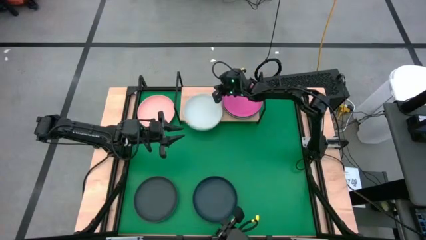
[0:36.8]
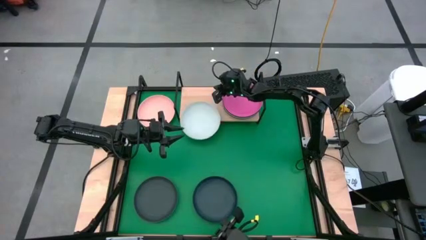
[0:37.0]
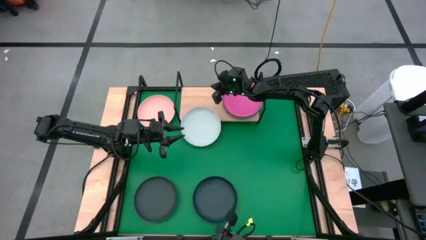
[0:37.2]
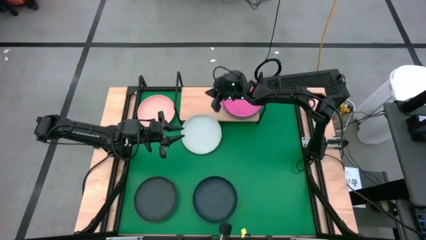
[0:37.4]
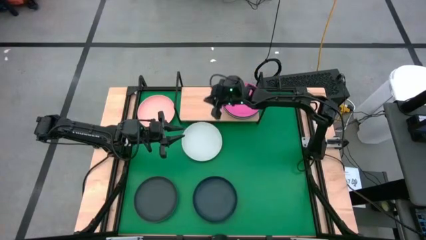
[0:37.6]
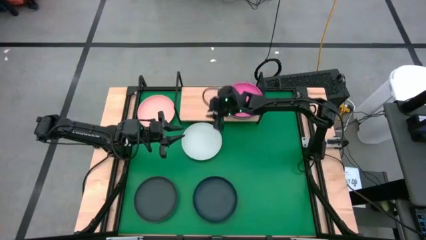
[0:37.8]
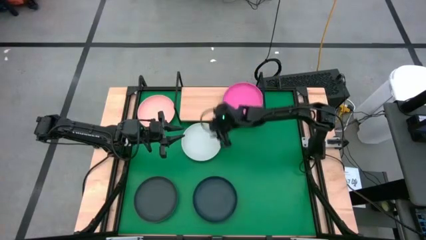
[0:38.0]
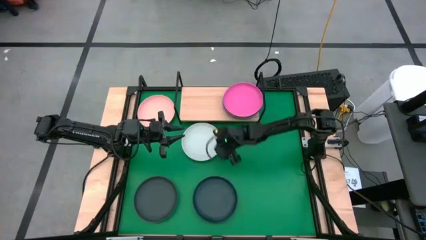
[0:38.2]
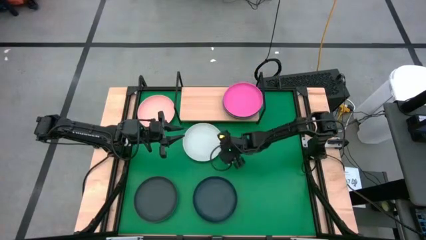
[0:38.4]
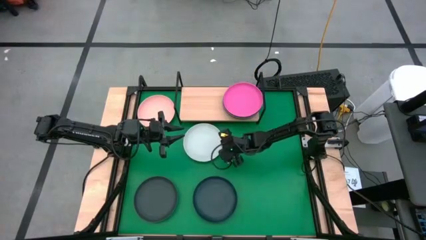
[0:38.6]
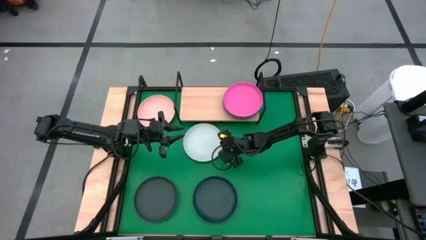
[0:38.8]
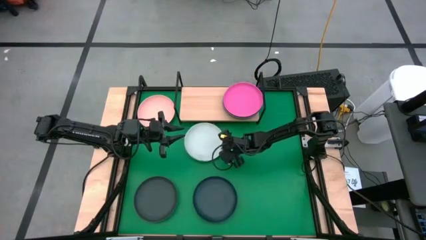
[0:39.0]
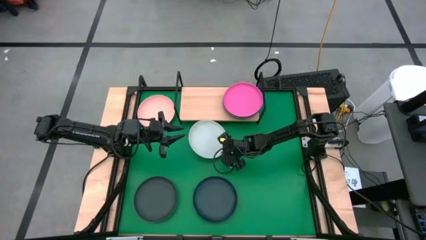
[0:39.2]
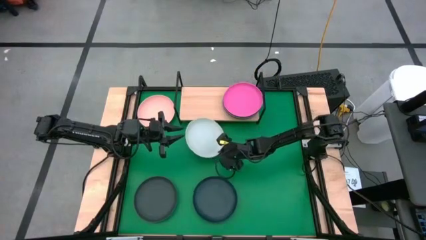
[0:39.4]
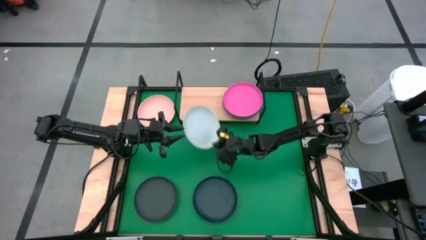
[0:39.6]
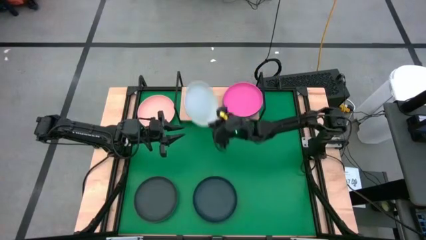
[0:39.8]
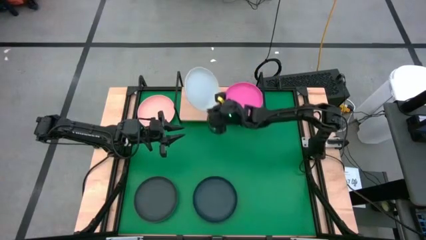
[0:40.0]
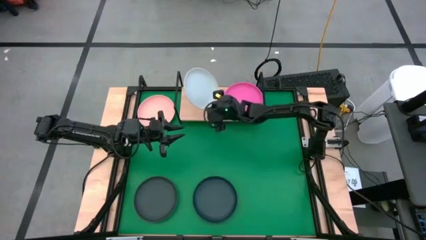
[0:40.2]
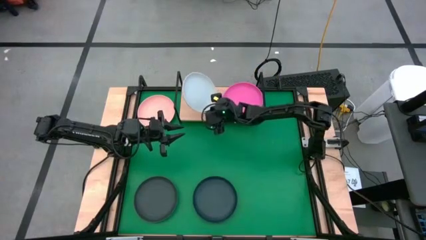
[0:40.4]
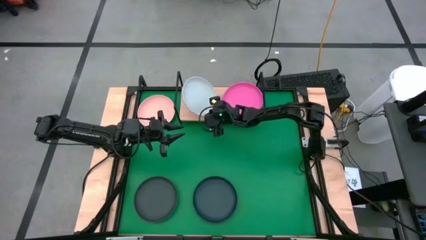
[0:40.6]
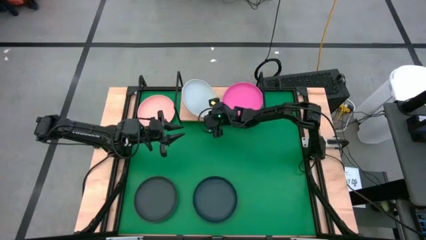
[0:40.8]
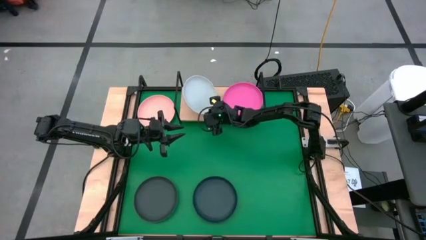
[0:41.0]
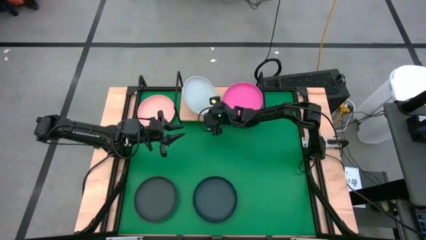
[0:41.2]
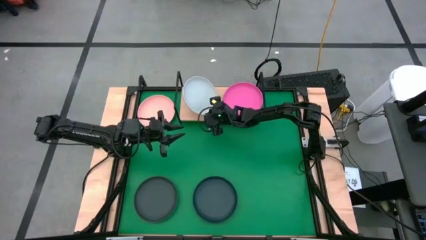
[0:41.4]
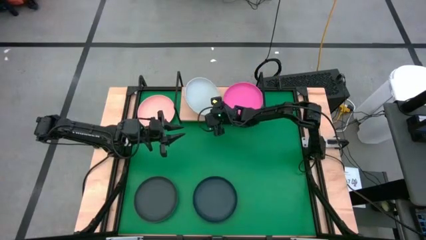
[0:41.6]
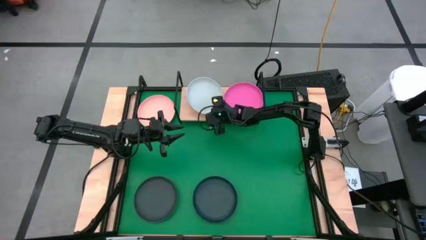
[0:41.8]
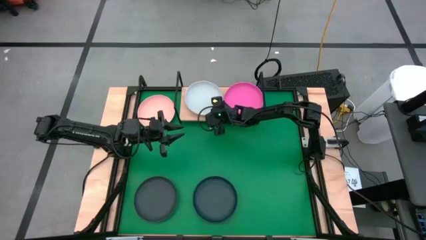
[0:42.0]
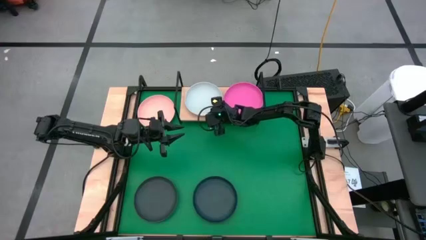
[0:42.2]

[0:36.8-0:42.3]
Task: Place and stack plates onto a shelf
Put the white plate on the shelf

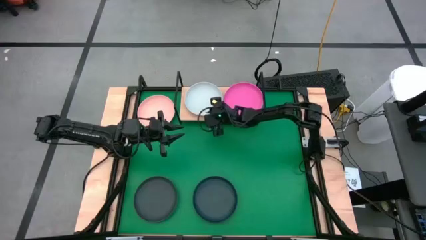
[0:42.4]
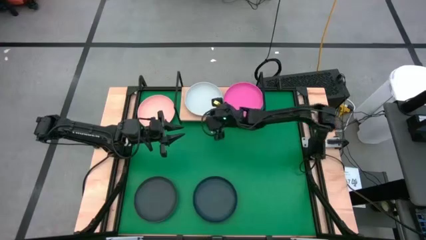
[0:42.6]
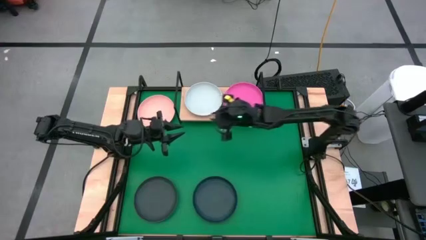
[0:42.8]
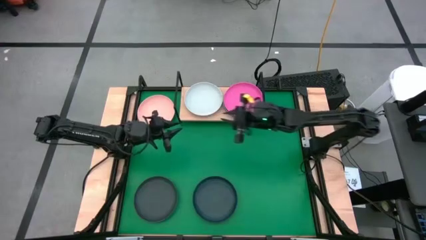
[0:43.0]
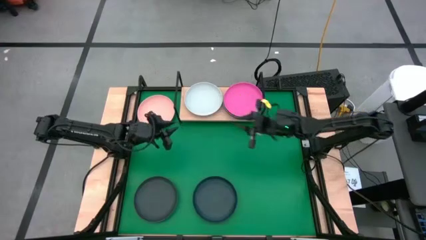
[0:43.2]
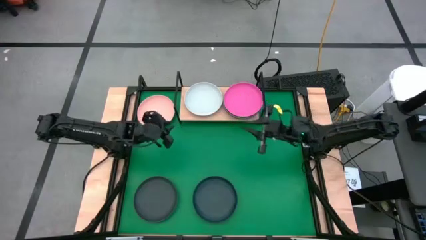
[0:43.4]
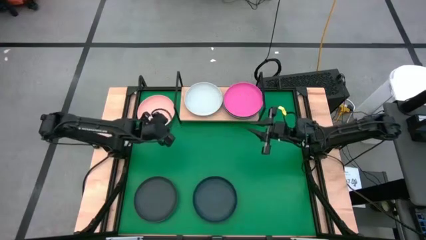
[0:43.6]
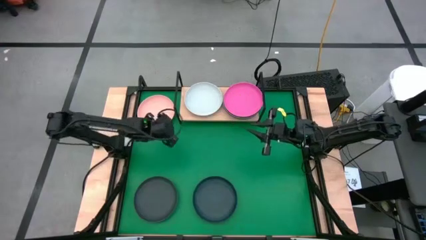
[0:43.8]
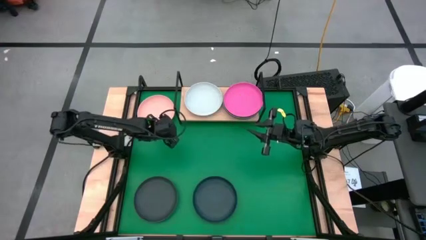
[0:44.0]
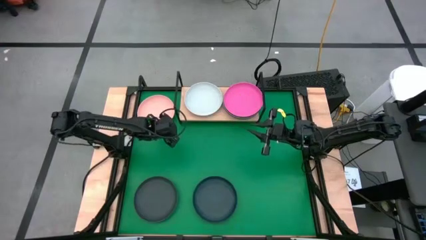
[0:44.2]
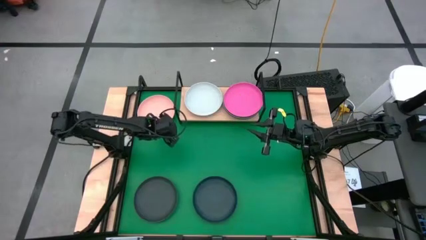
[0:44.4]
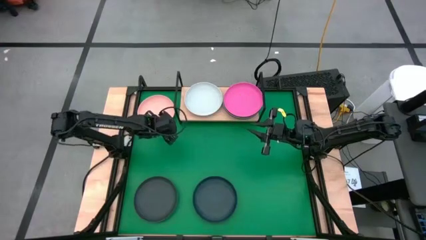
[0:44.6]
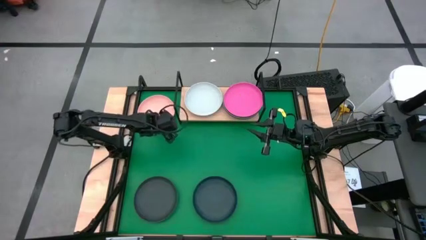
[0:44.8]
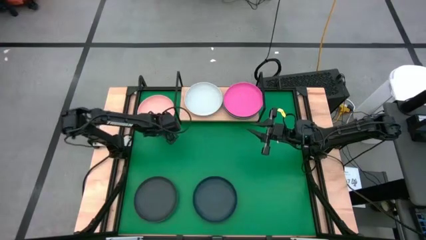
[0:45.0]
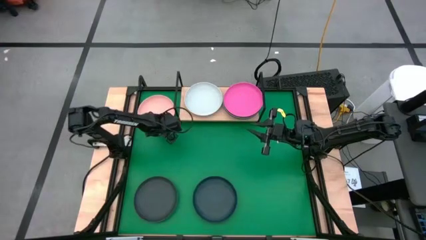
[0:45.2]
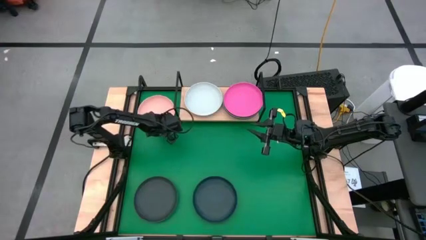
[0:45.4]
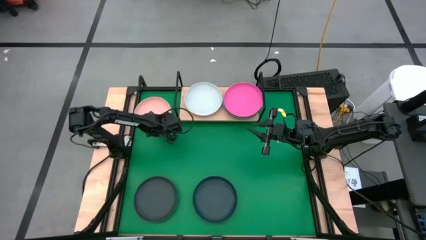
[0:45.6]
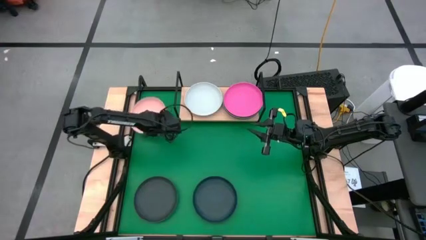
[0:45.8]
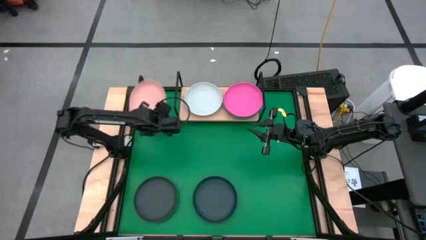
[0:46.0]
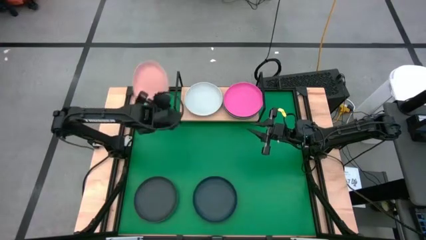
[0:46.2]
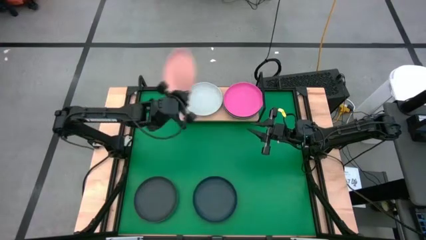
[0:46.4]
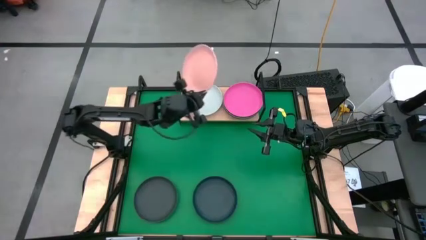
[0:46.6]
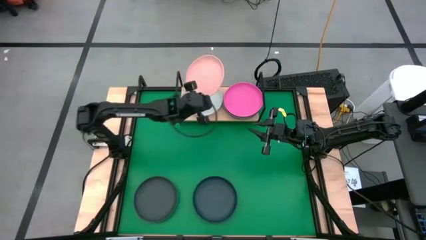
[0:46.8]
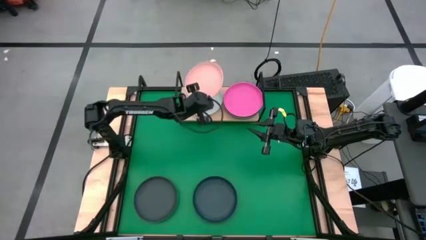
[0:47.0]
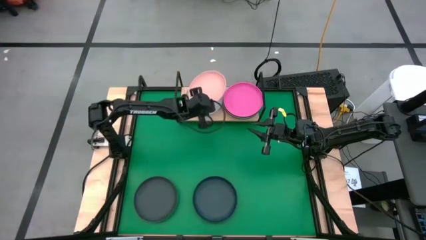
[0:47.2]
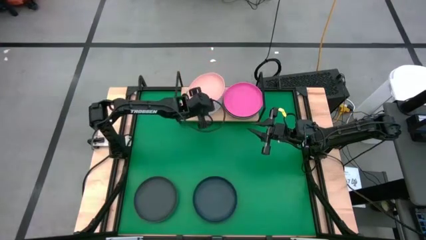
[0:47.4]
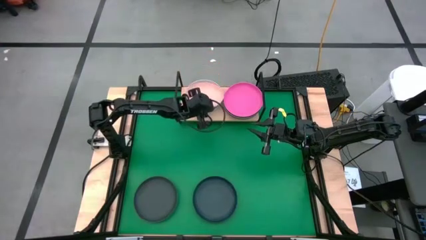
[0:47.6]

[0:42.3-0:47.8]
Stack the peach plate on top of the white plate on the shelf

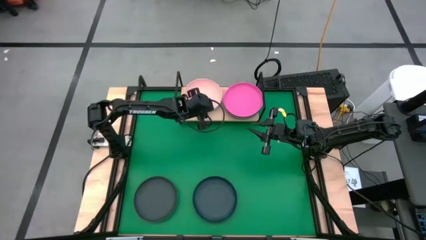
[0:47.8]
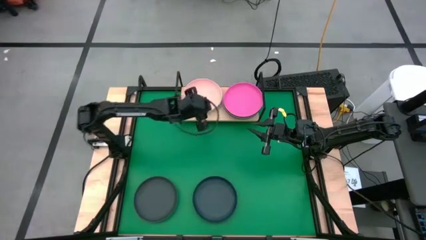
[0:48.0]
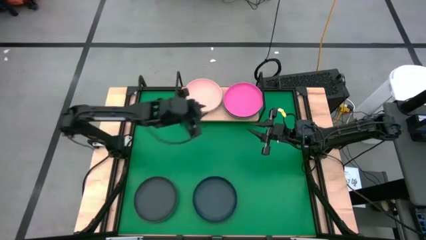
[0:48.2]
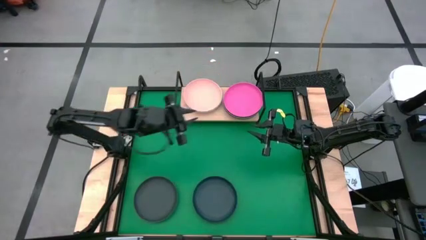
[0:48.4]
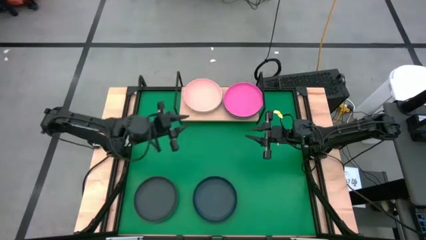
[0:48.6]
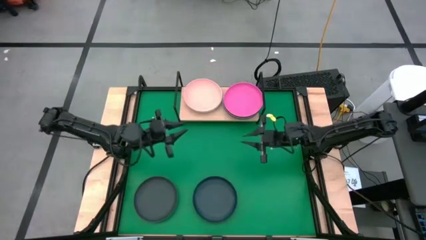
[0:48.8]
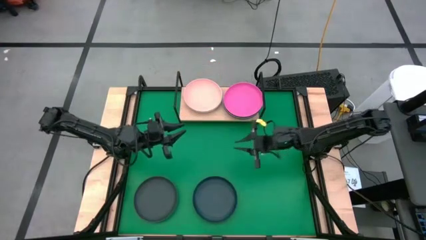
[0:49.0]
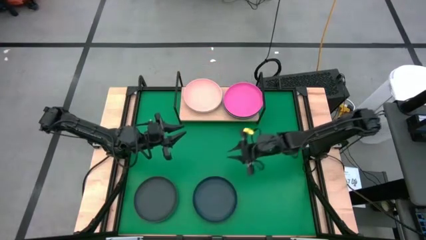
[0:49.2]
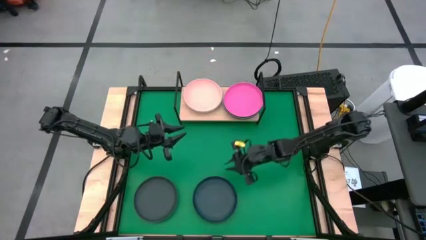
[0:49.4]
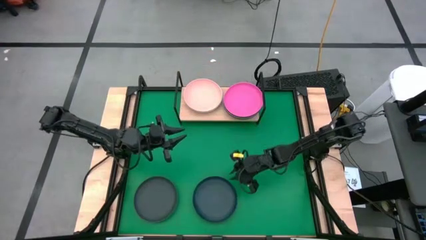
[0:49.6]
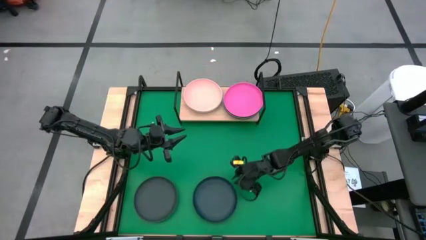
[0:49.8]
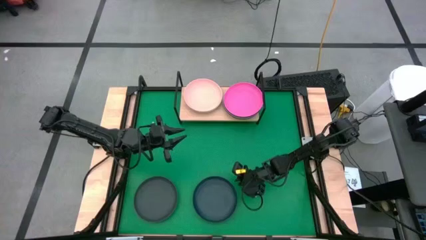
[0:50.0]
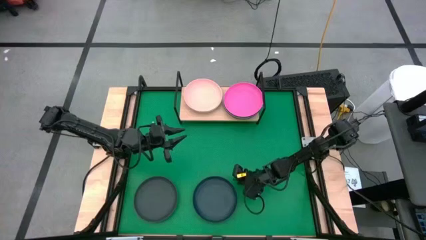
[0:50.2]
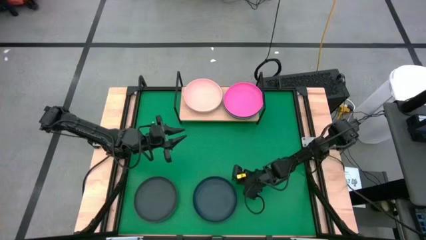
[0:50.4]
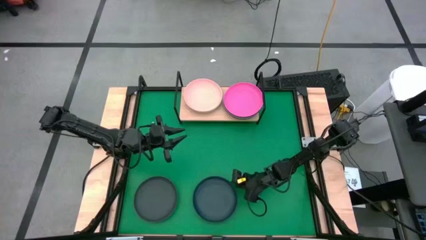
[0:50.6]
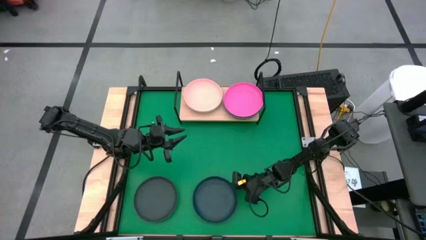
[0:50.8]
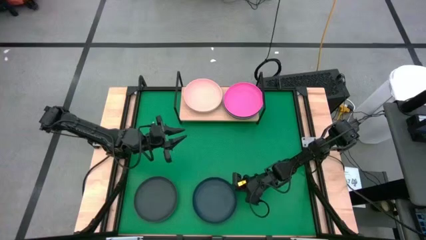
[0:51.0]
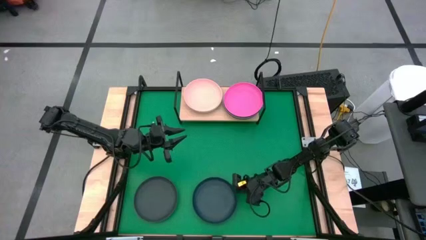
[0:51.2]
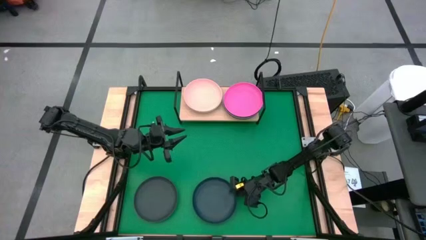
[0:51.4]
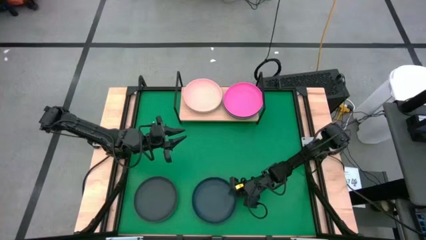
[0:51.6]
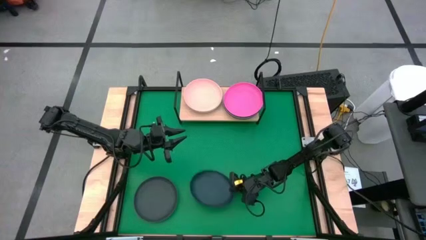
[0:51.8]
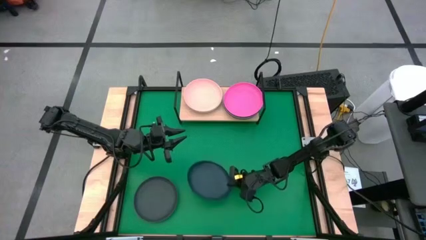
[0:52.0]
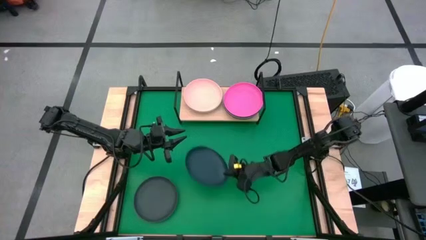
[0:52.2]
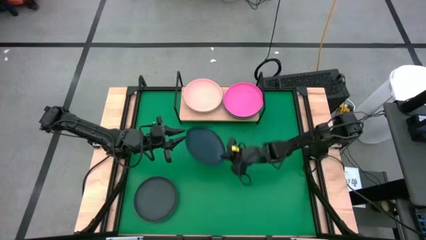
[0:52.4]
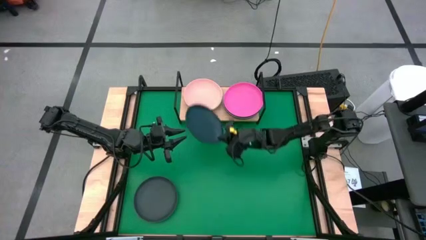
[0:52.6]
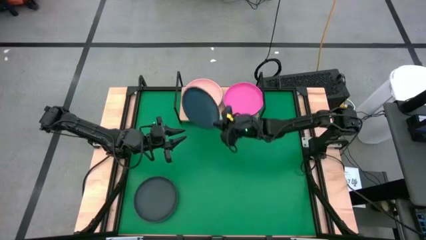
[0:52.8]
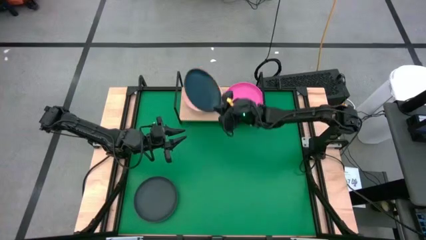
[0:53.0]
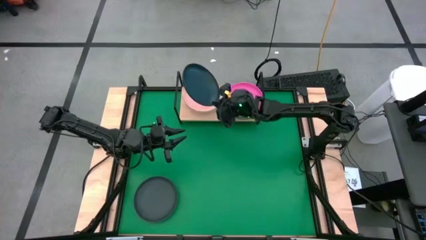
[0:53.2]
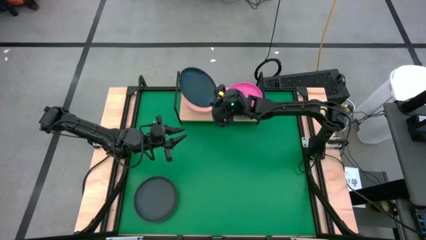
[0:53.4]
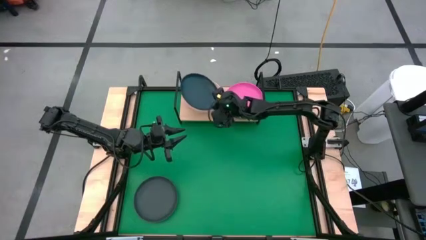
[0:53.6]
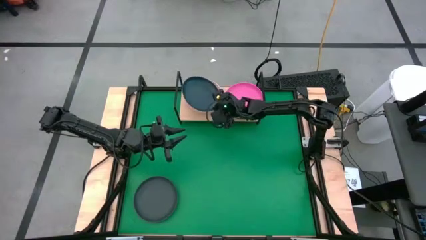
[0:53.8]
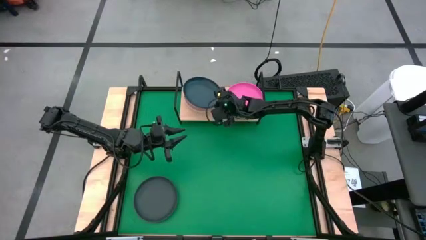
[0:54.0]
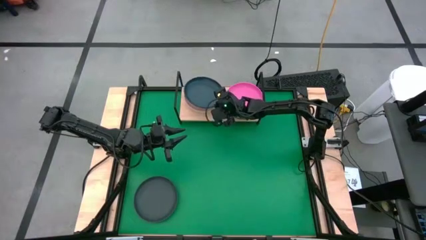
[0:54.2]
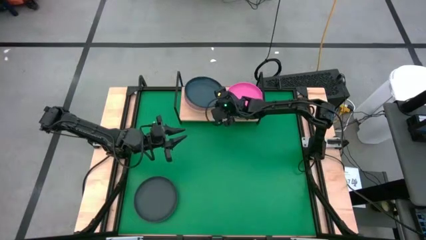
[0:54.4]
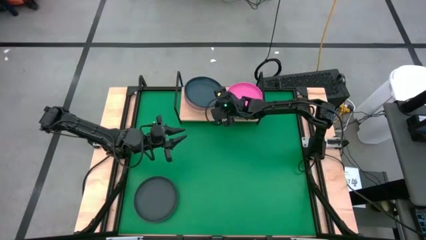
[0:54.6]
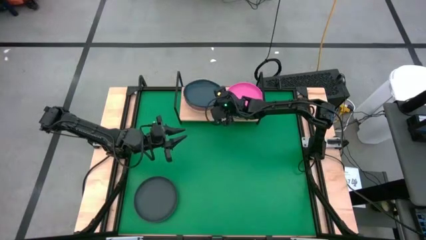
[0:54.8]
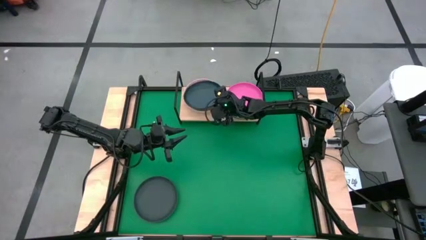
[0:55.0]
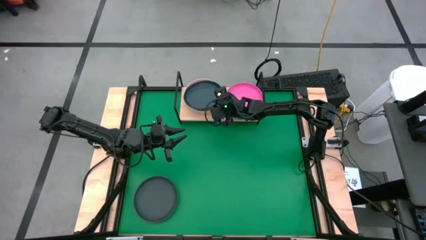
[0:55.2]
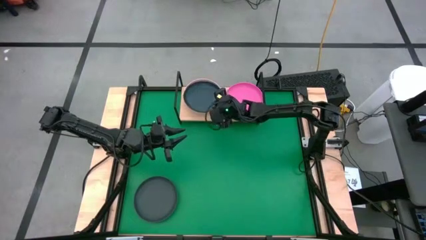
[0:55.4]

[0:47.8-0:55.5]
Stack the dark blue plate on top of the peach plate on the shelf
